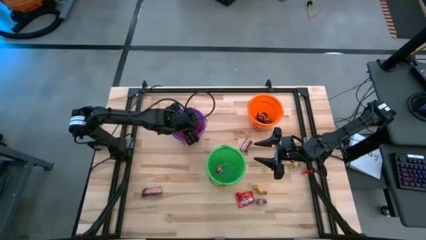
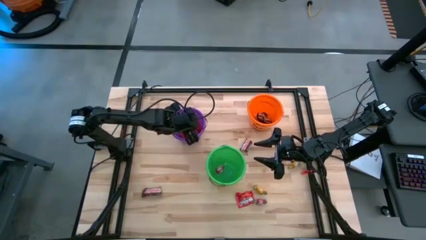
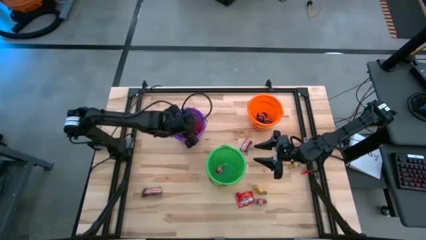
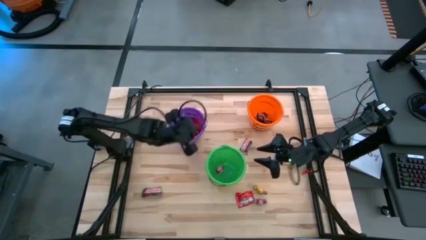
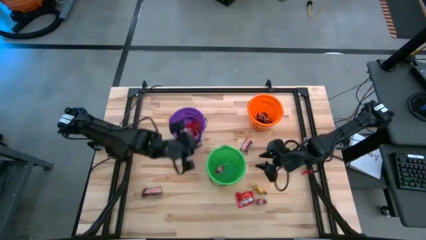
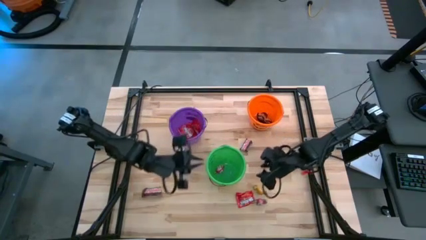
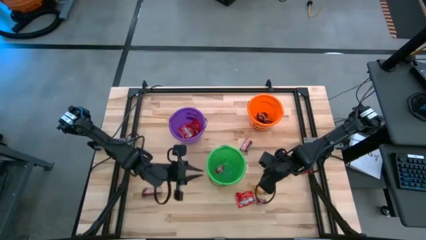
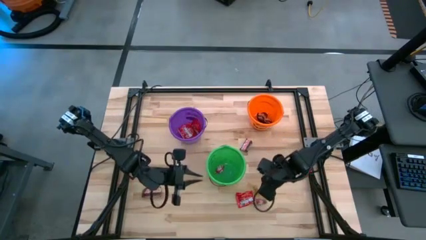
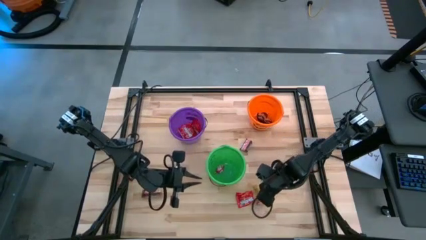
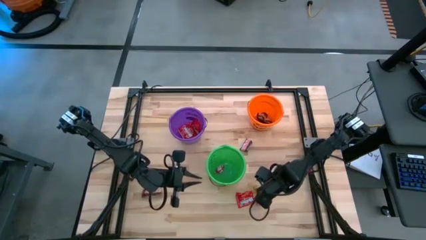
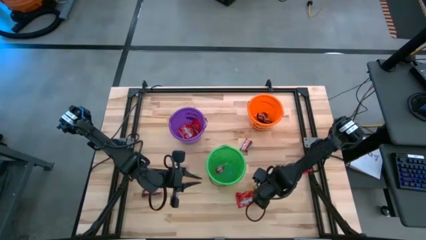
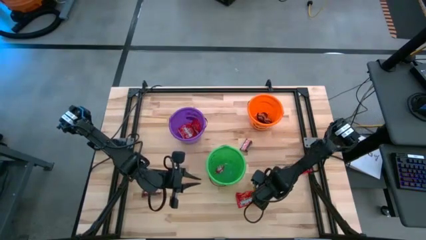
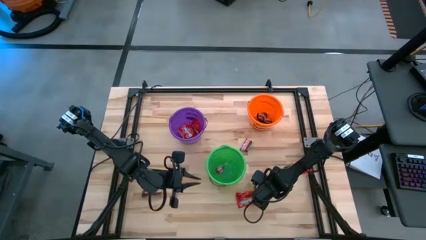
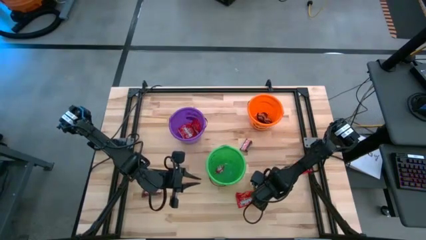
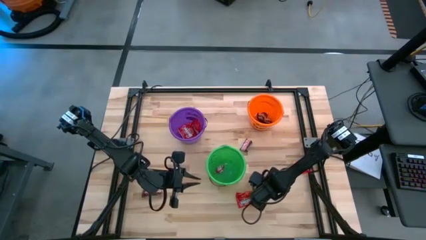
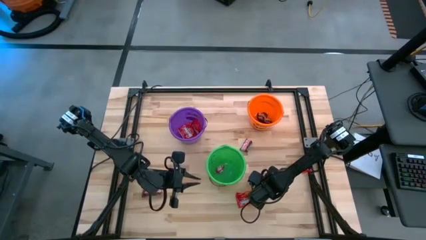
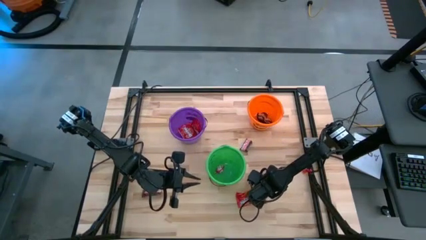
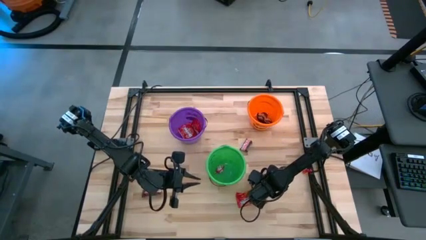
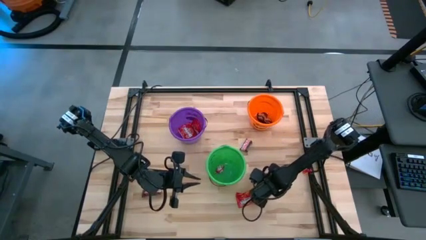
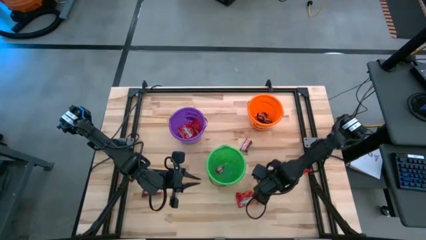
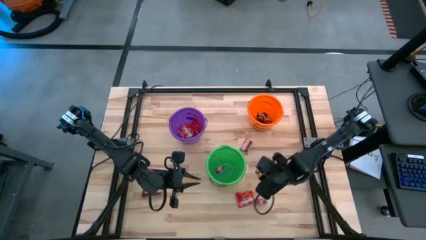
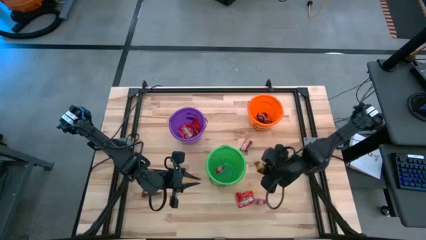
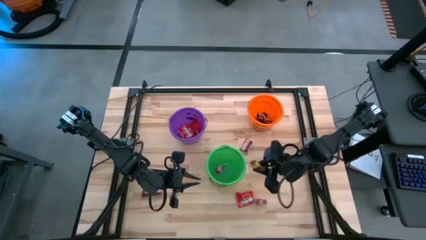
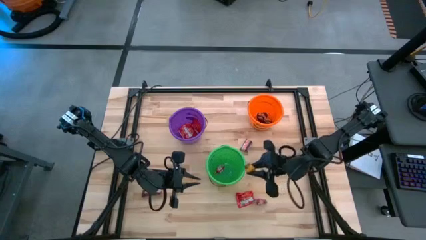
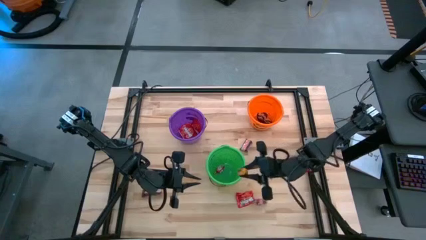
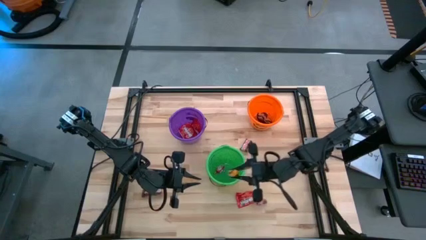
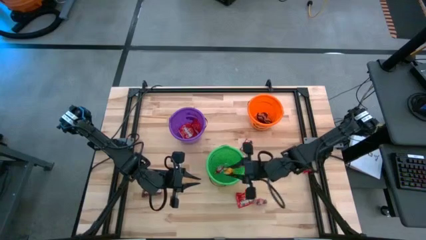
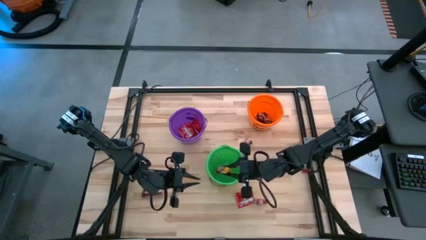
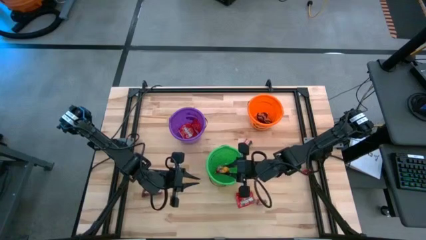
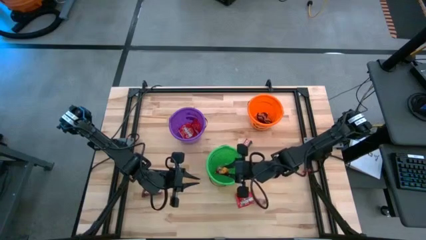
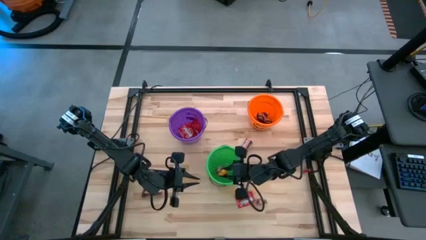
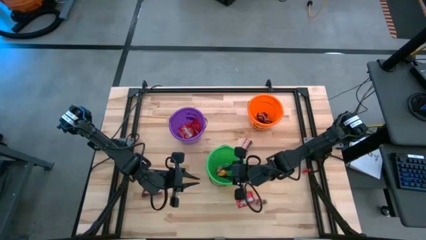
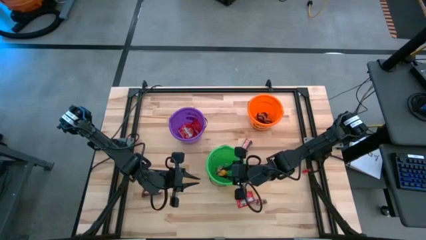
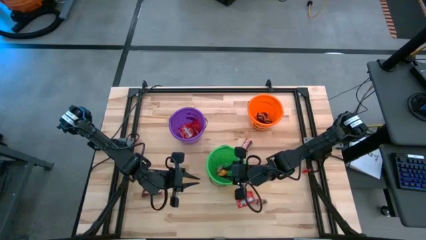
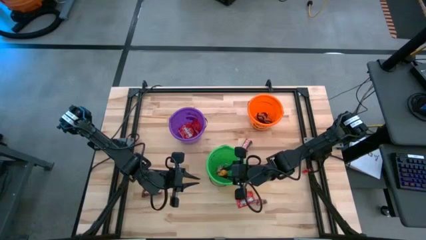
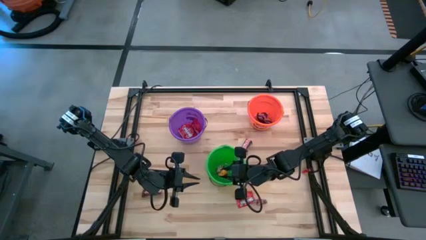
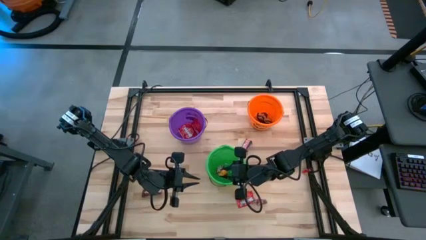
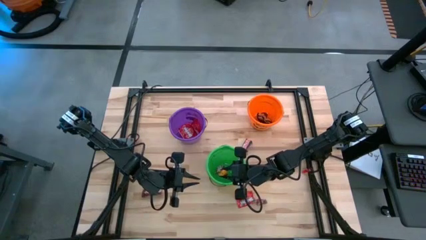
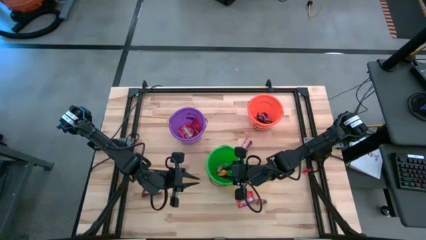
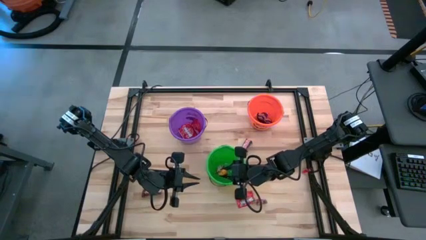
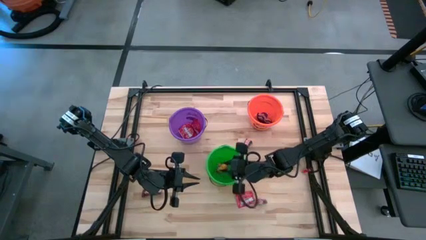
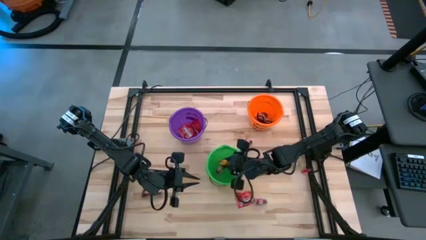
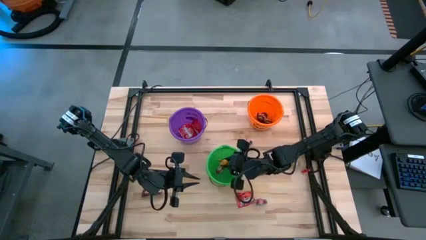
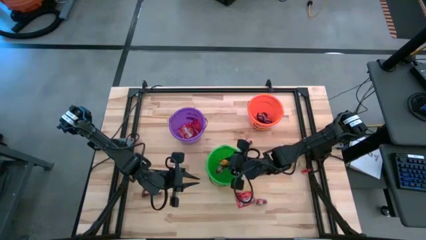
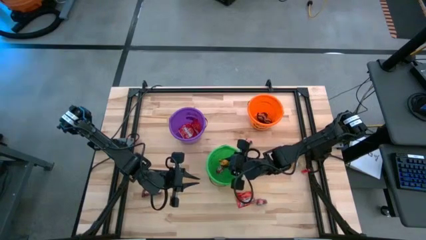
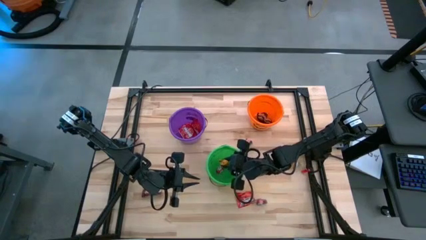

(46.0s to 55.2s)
Task: Organize candy in baskets
Put the yellow candy into the green bucket

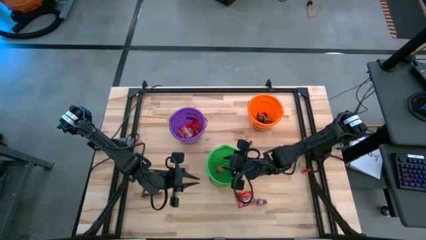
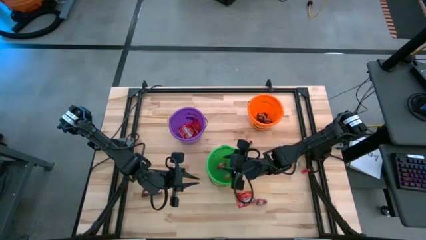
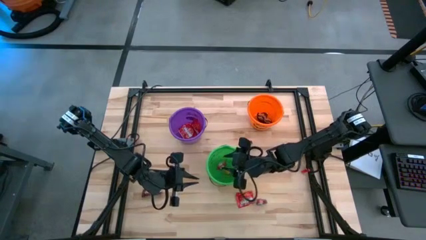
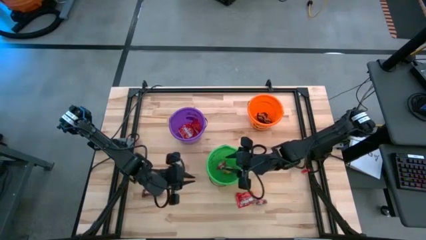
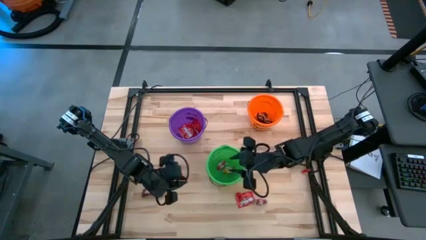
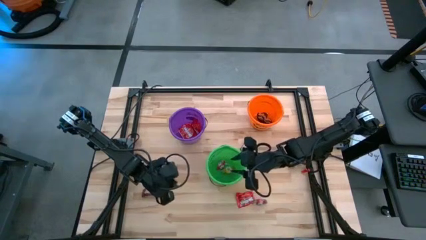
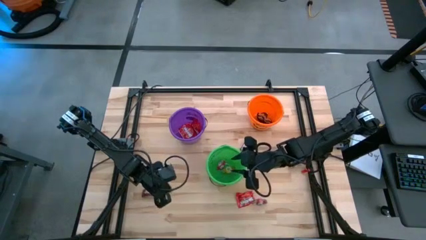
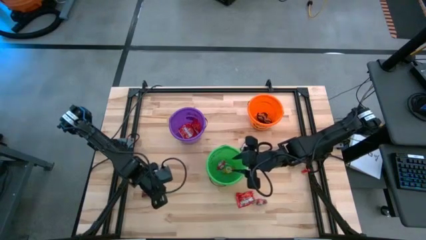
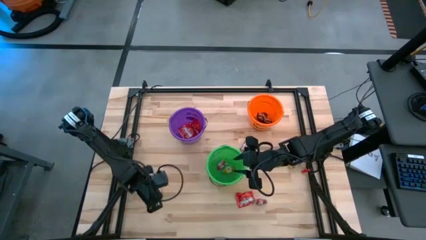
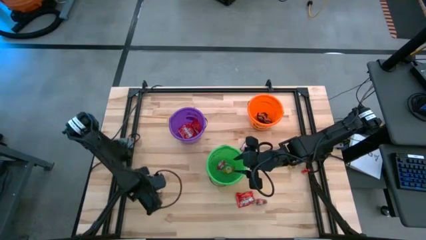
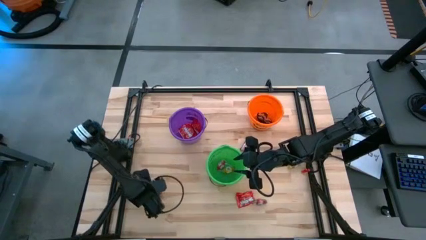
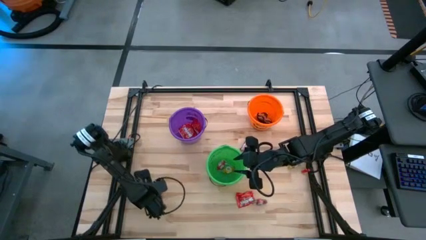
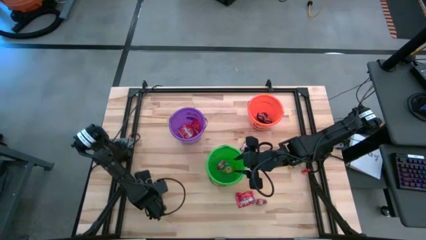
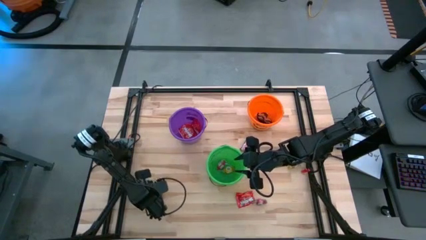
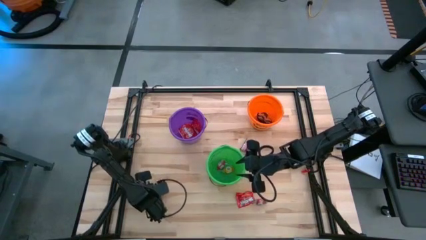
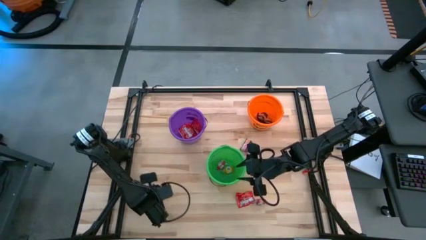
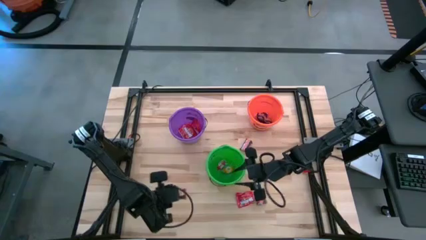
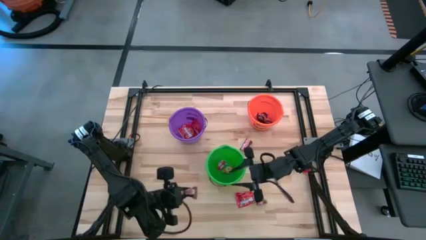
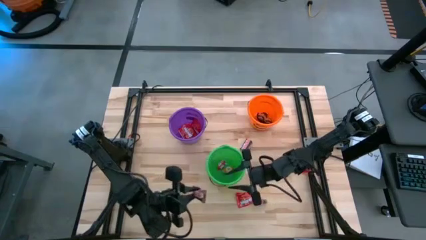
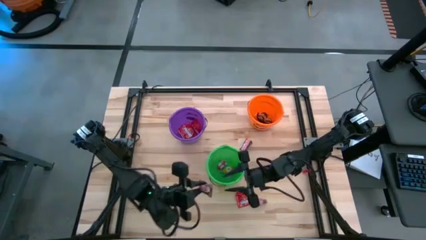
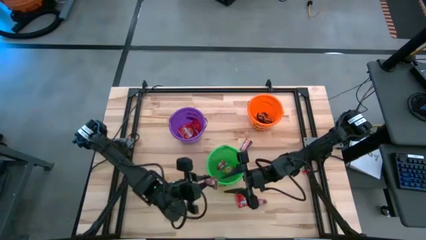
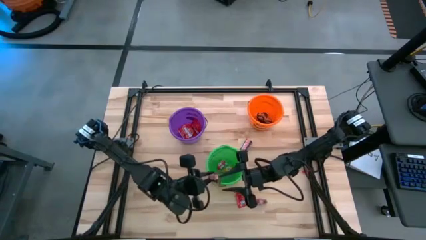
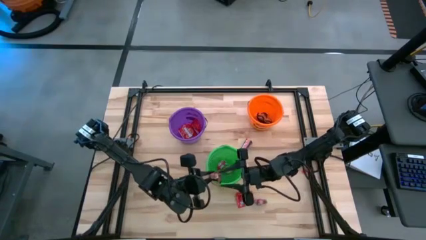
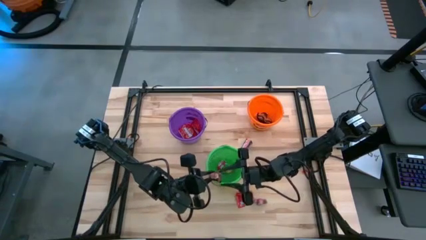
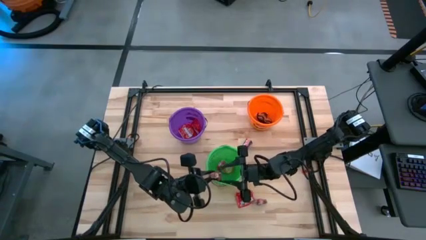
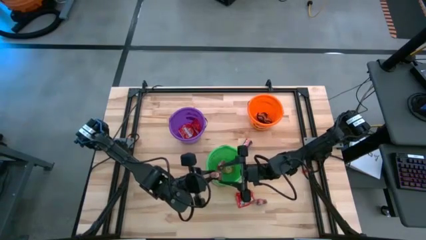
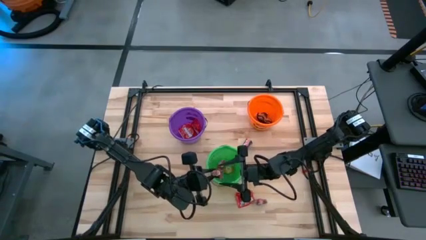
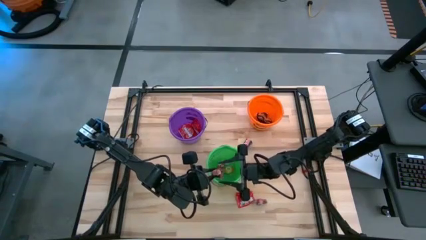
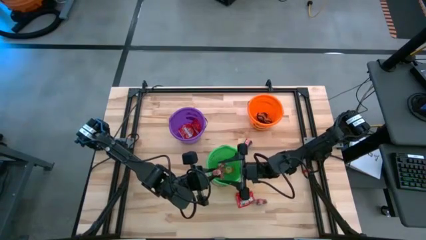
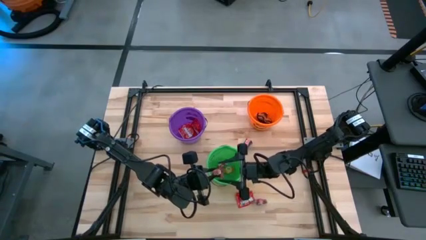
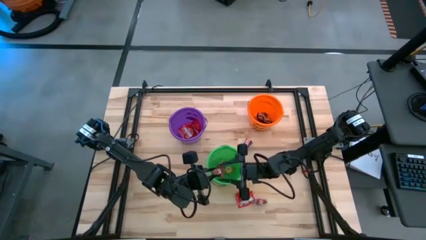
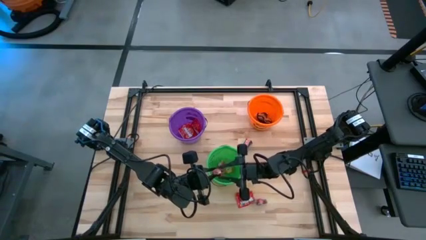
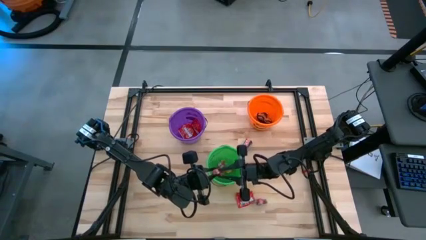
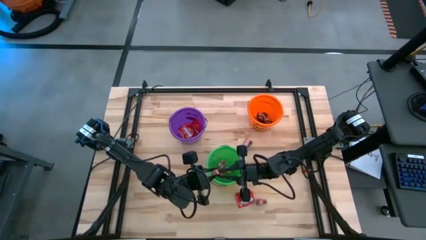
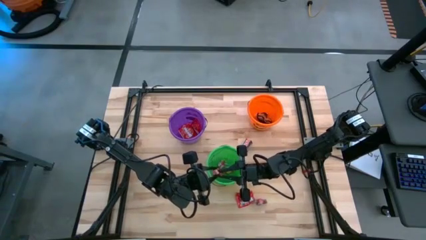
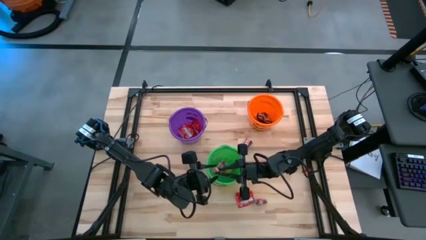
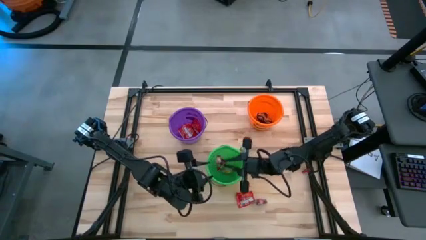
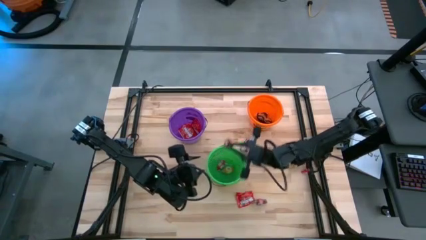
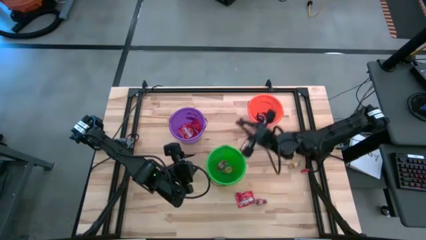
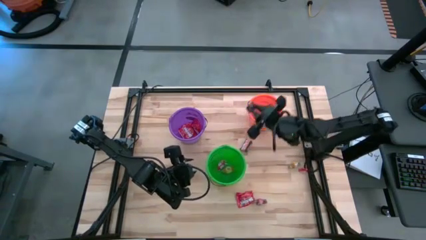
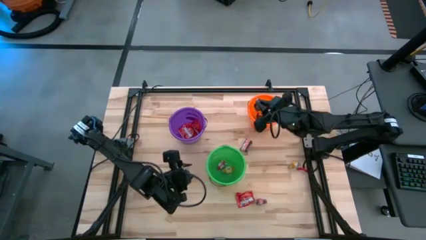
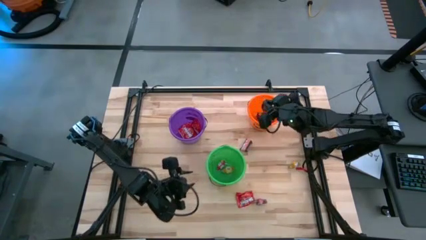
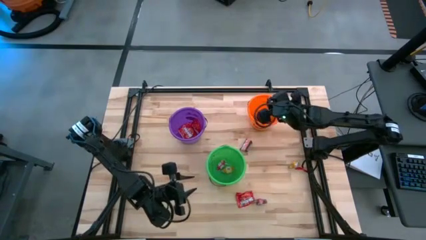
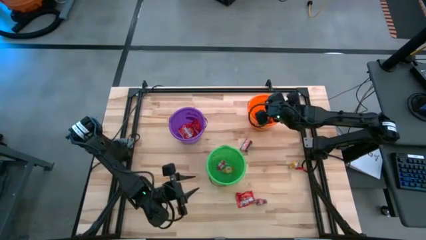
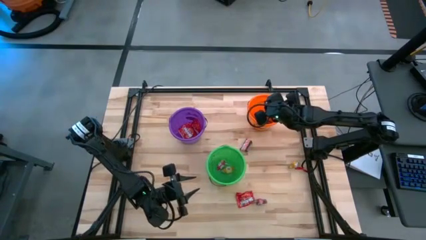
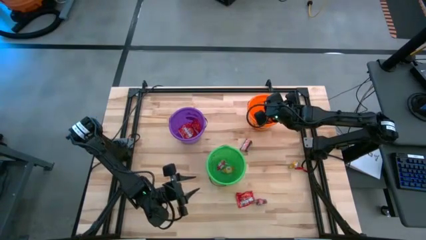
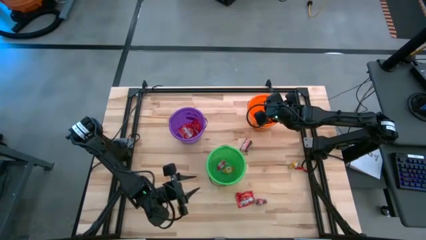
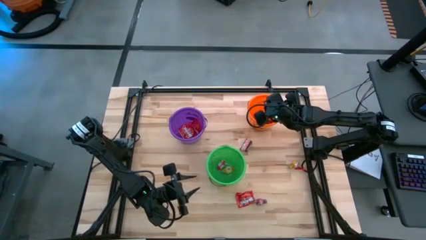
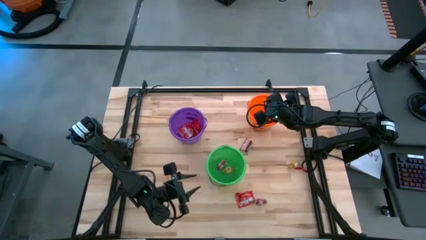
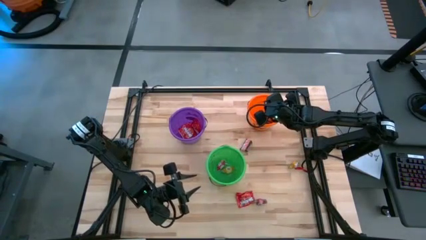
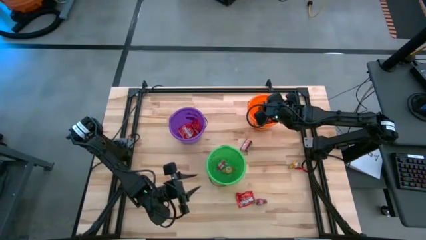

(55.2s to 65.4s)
Put the brown chocolate bar into the orange bucket
